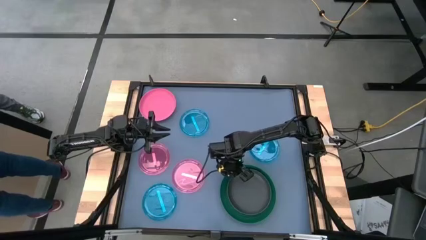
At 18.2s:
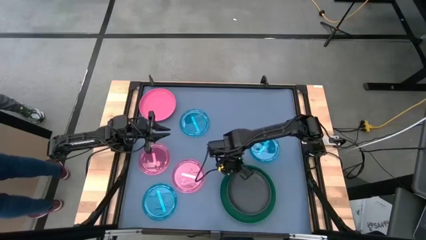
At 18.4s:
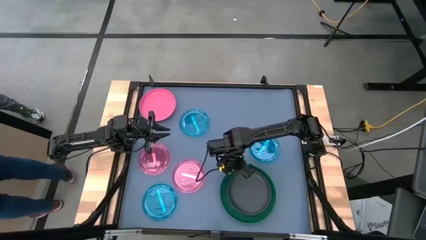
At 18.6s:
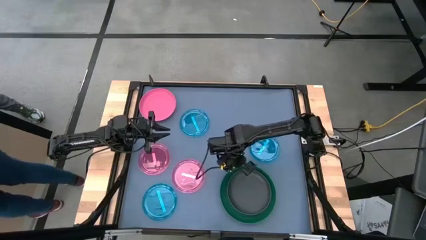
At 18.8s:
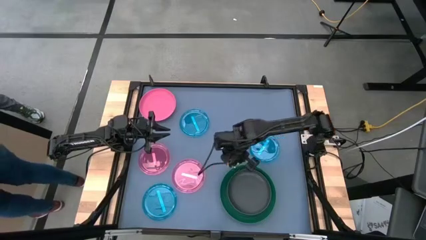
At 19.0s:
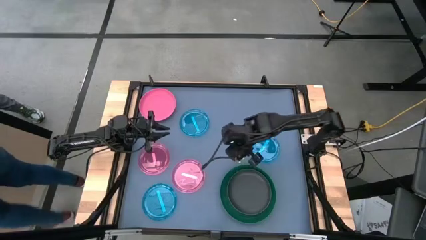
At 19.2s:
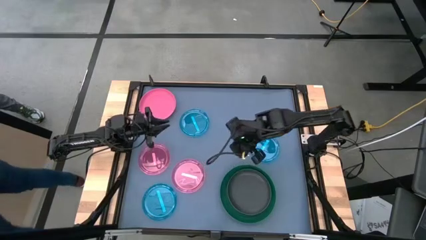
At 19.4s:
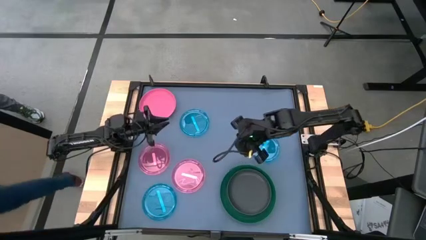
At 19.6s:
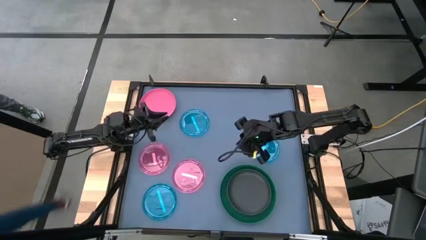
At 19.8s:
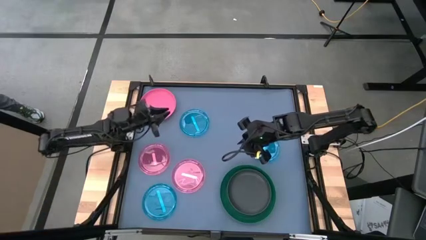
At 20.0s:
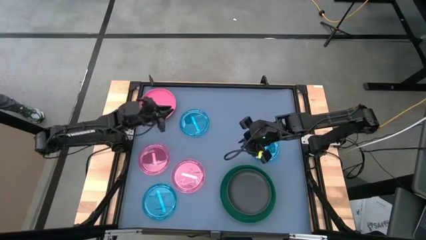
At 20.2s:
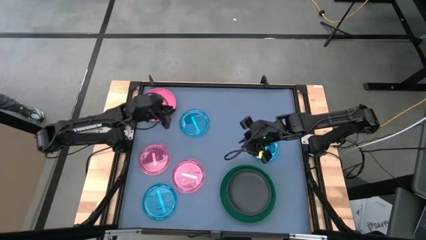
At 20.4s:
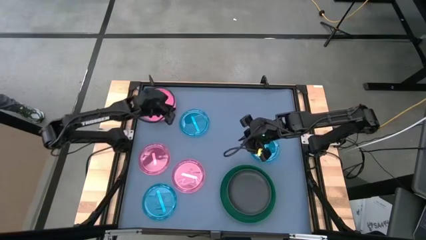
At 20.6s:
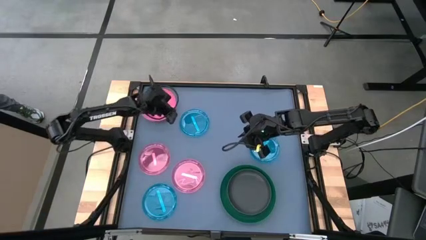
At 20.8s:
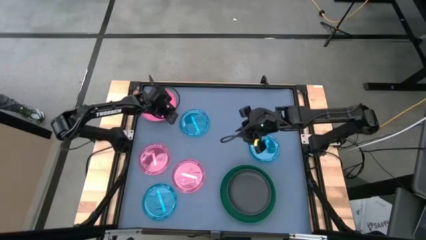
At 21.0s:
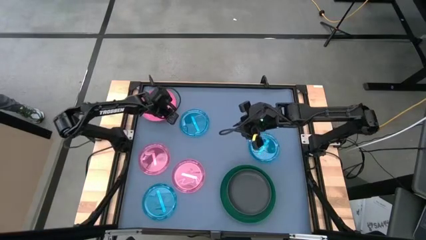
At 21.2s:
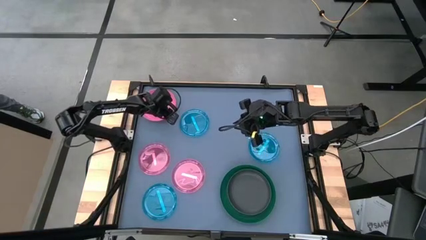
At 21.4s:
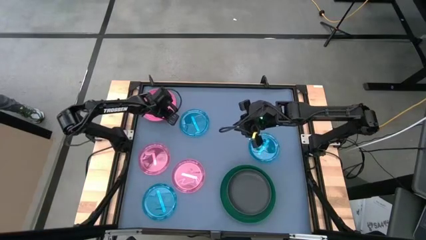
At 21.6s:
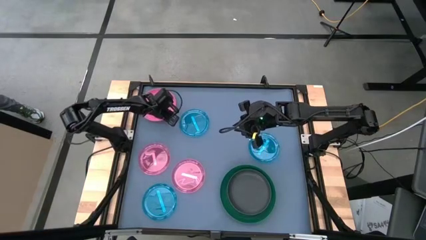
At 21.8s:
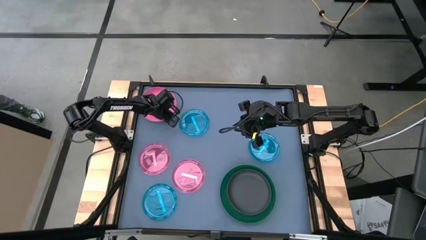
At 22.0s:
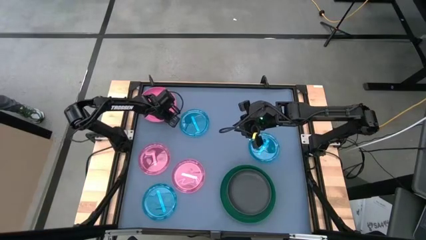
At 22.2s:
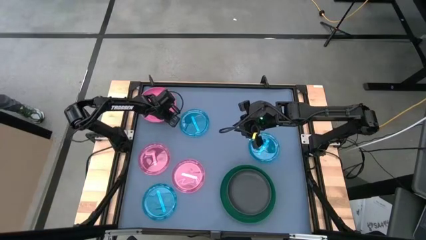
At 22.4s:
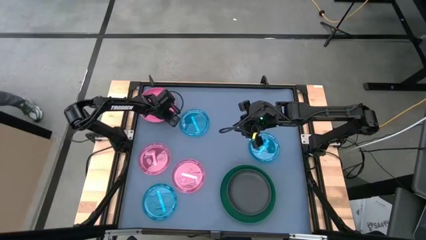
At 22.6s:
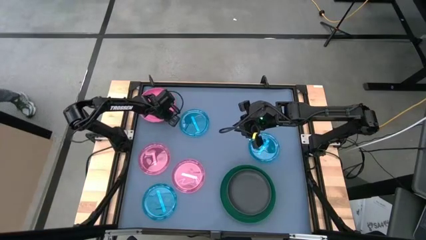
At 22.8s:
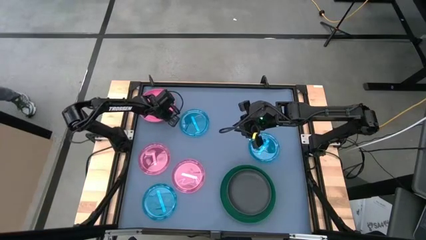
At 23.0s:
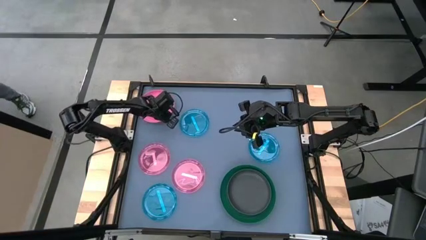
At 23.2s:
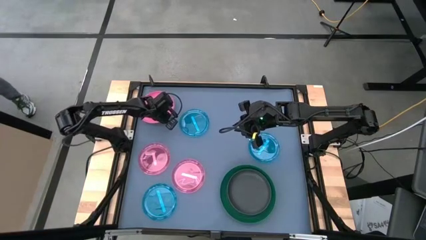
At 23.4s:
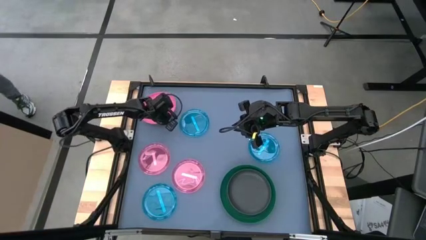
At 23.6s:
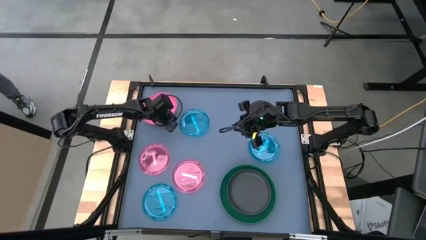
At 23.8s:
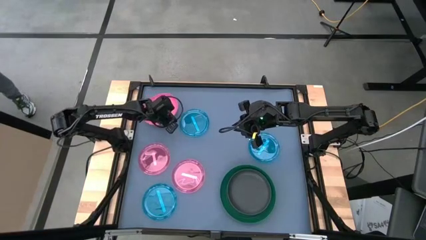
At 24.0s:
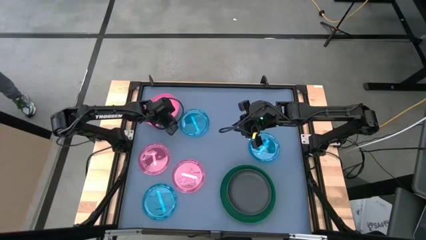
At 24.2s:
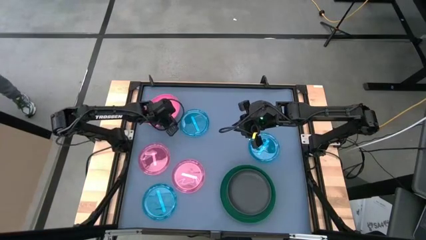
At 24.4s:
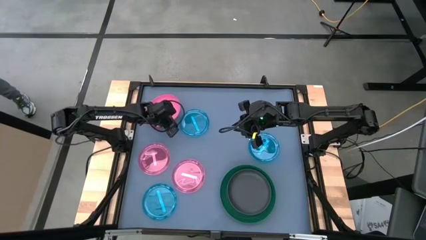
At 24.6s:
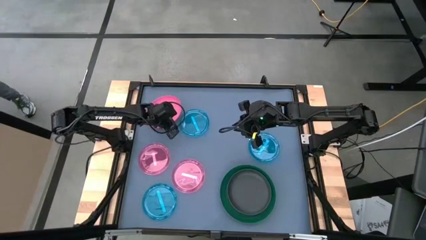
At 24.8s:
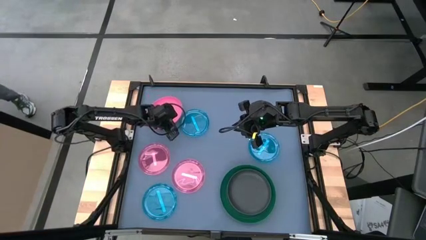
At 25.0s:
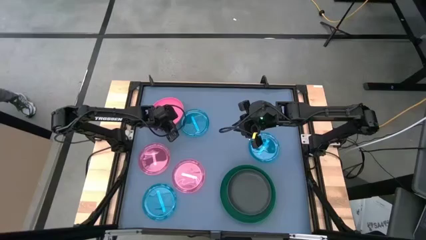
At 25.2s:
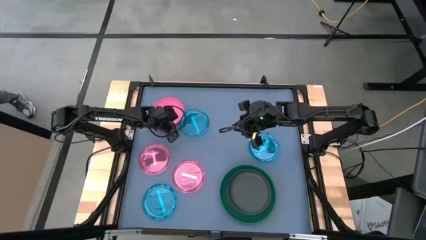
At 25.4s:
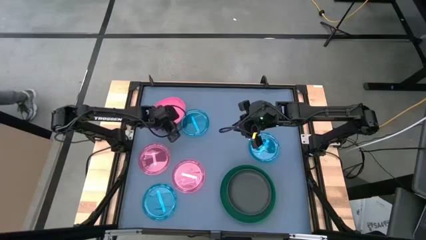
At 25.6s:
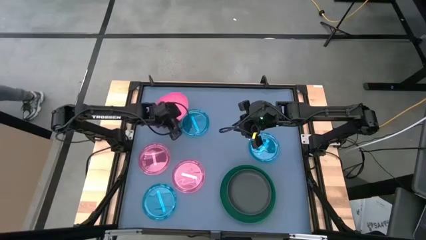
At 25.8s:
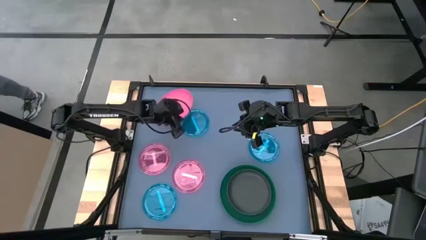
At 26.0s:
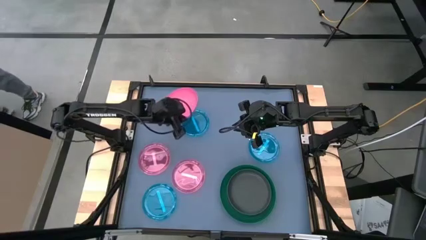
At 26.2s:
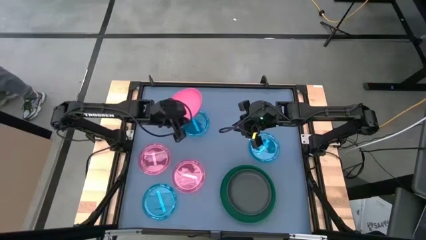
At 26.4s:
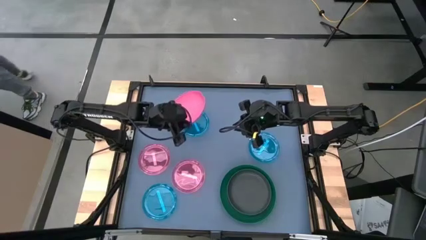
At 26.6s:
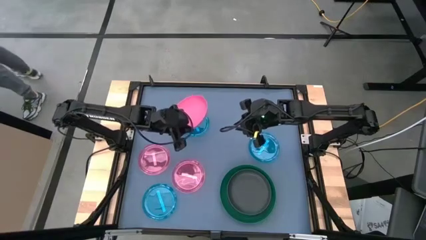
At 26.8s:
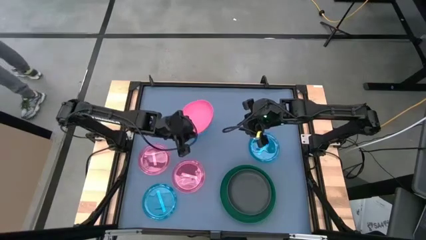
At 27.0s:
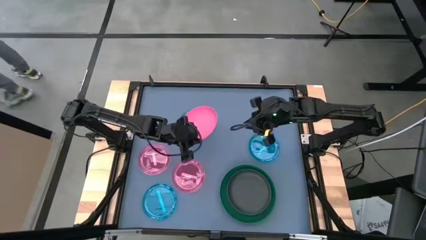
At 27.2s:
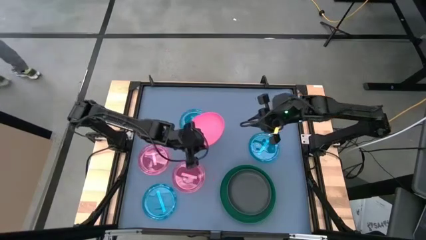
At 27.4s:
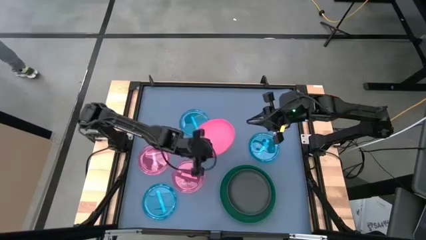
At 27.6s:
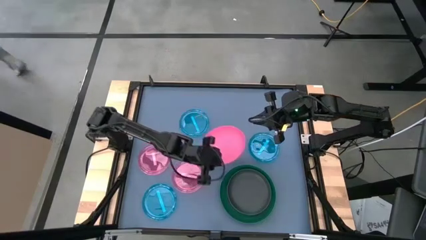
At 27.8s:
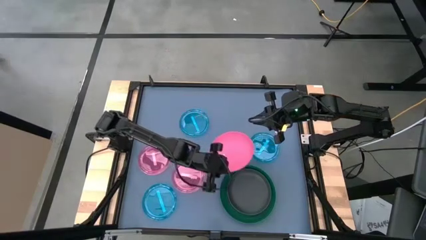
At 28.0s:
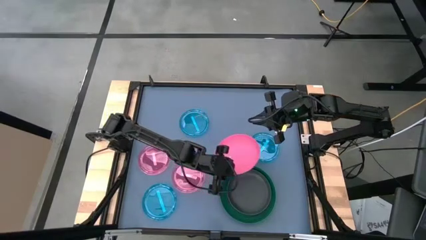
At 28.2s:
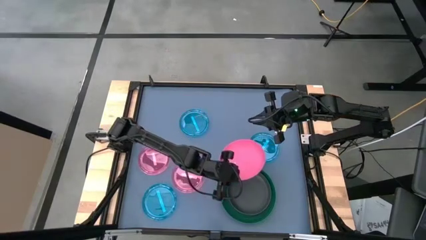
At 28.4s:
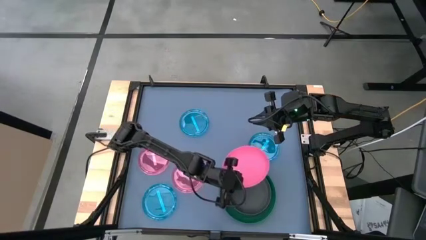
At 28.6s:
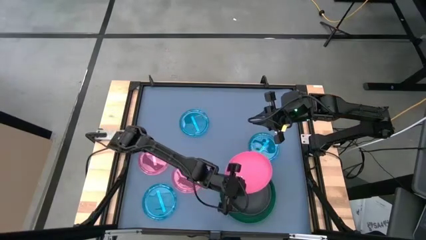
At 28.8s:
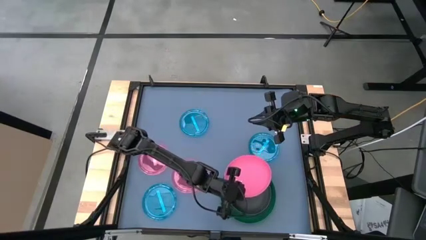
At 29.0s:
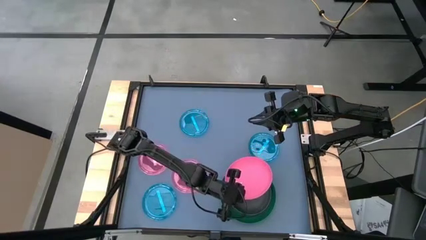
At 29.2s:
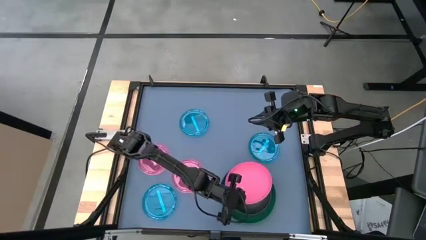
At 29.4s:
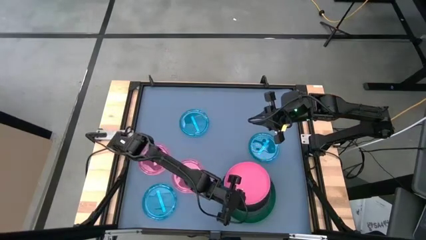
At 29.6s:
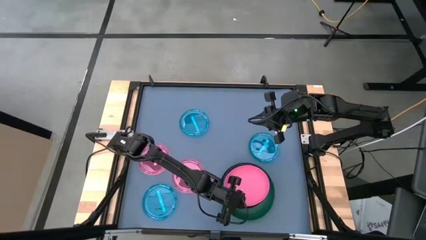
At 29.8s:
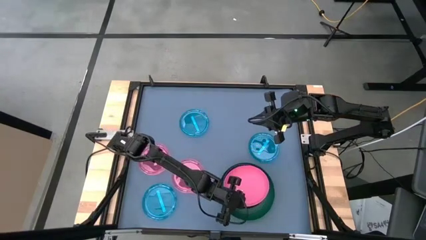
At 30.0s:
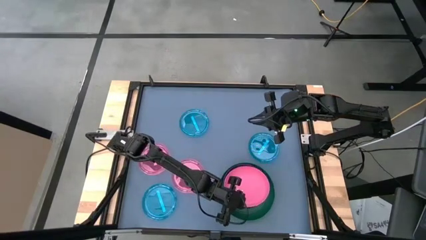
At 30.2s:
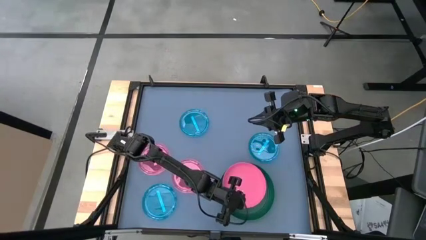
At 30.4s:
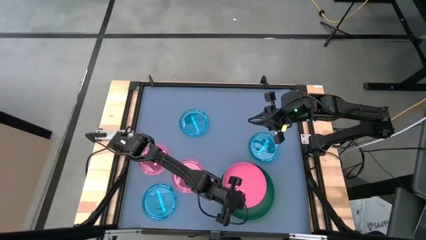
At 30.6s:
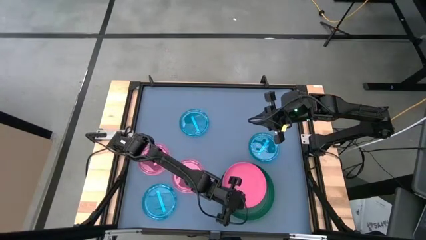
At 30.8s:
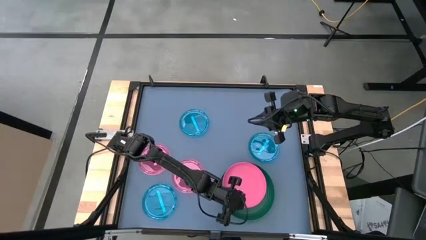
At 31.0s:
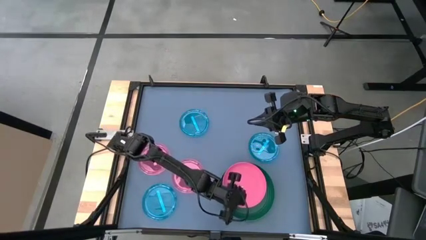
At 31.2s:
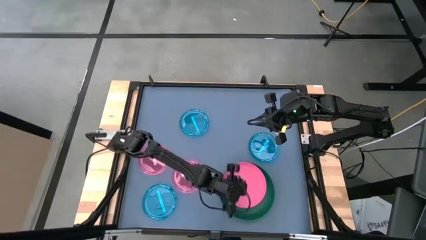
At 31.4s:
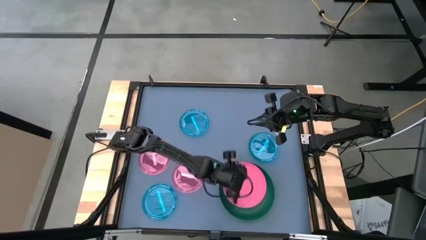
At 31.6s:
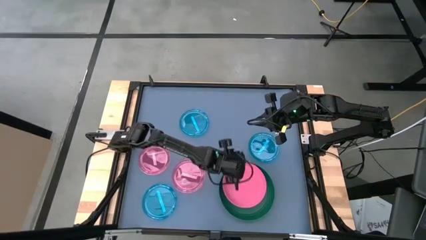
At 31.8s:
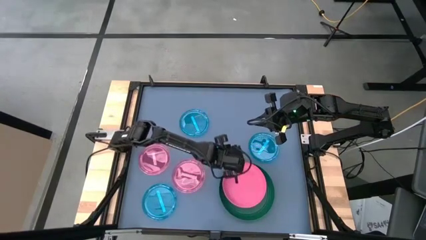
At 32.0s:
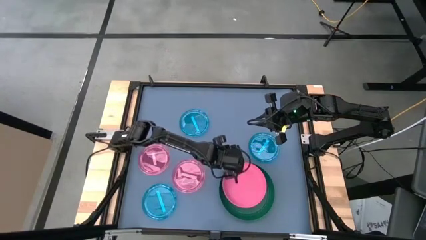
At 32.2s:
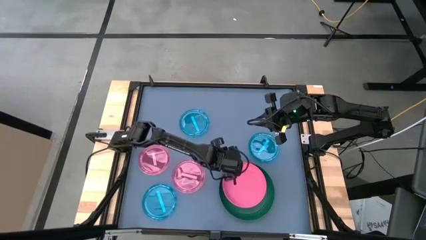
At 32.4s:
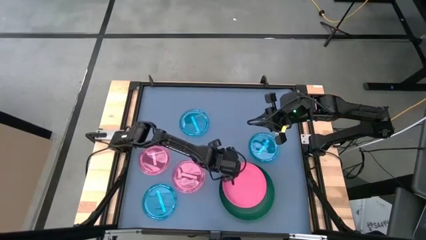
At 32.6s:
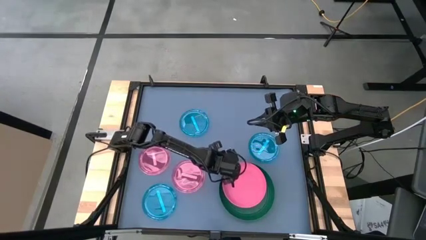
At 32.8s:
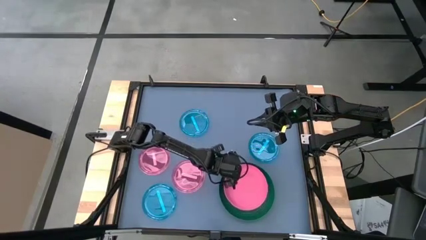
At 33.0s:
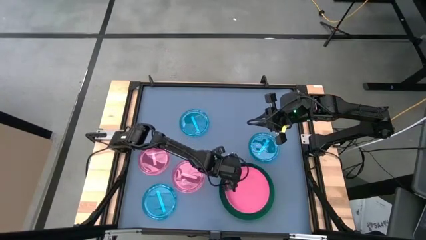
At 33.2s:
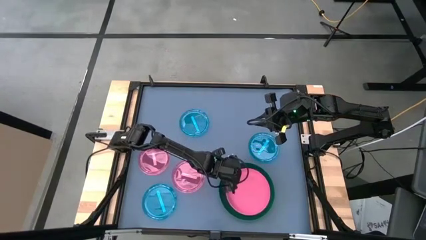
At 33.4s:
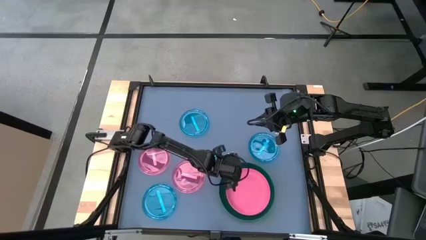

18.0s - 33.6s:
Task: Stack plastic plates
Stack the pink plate on top of the black plate
